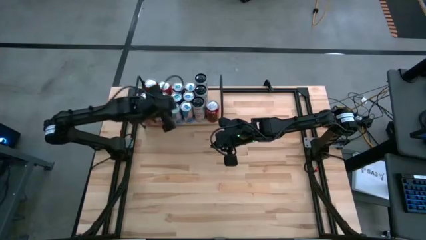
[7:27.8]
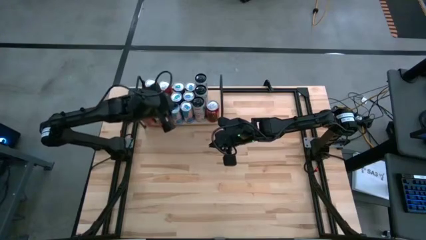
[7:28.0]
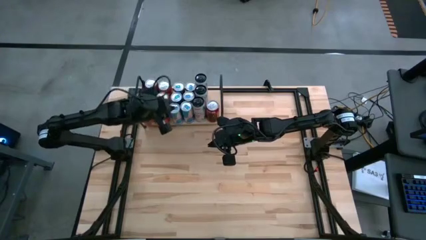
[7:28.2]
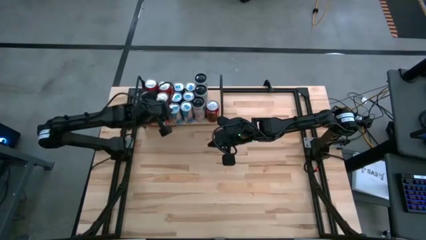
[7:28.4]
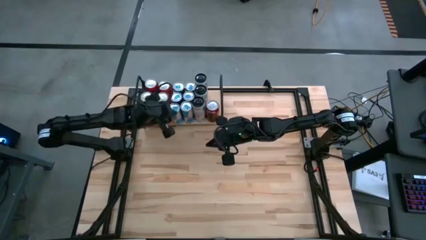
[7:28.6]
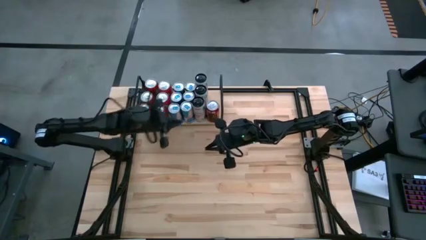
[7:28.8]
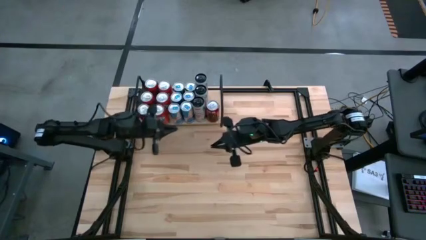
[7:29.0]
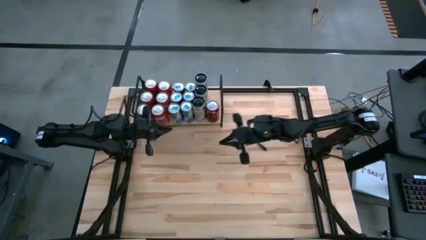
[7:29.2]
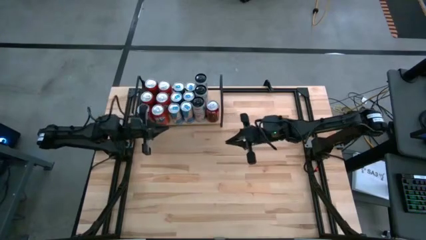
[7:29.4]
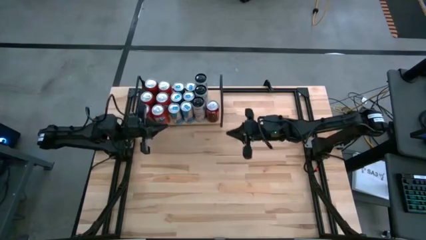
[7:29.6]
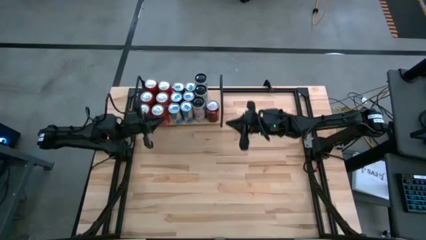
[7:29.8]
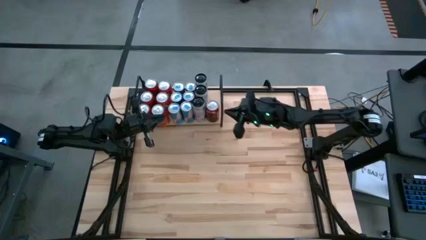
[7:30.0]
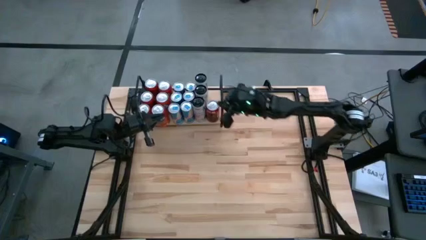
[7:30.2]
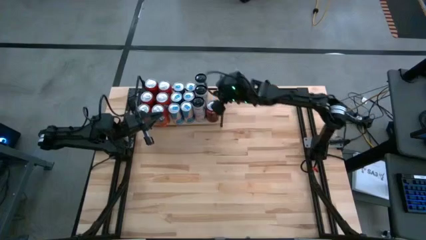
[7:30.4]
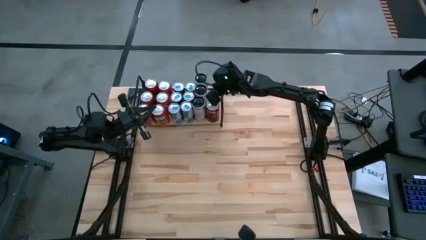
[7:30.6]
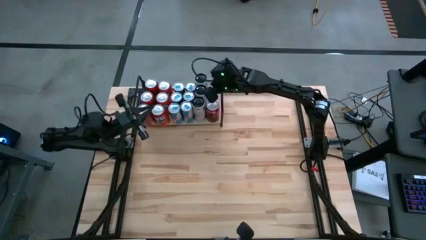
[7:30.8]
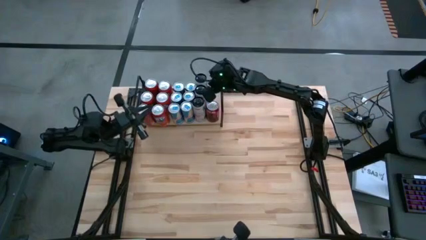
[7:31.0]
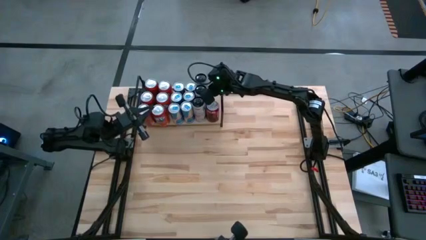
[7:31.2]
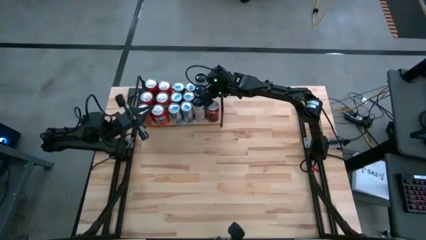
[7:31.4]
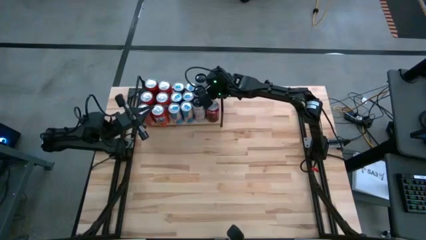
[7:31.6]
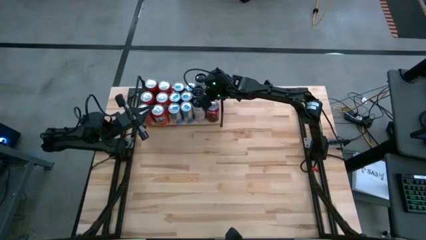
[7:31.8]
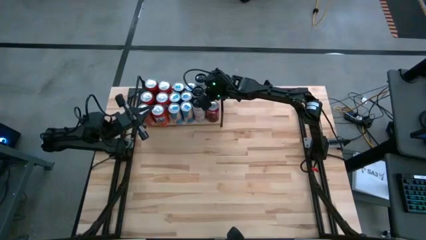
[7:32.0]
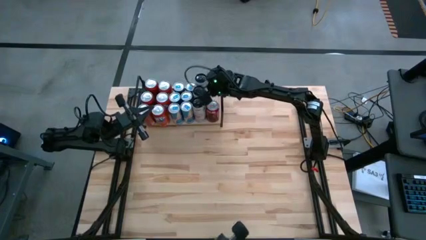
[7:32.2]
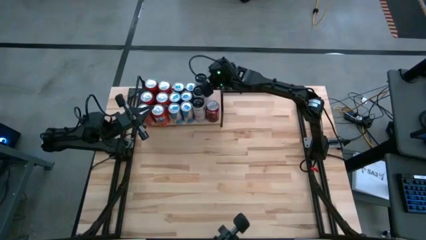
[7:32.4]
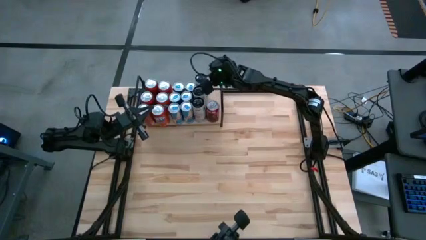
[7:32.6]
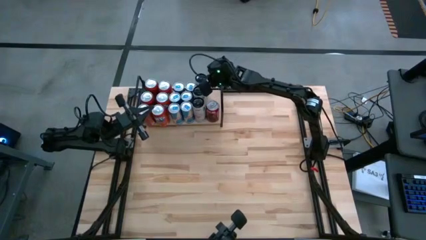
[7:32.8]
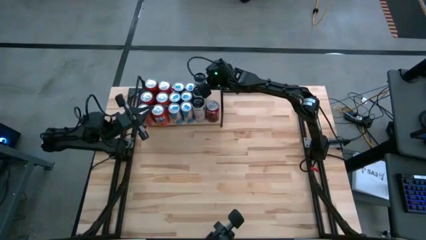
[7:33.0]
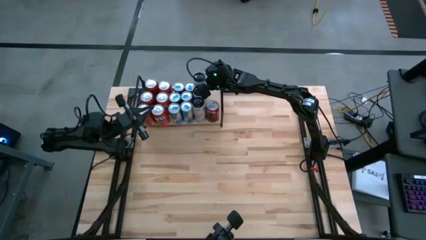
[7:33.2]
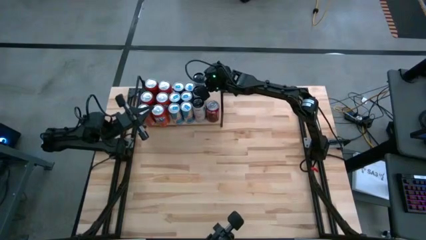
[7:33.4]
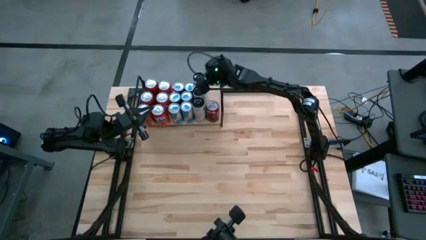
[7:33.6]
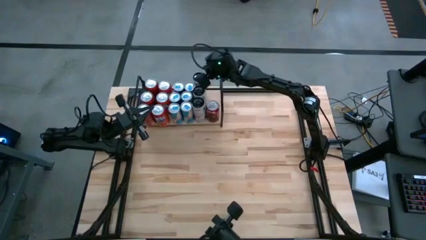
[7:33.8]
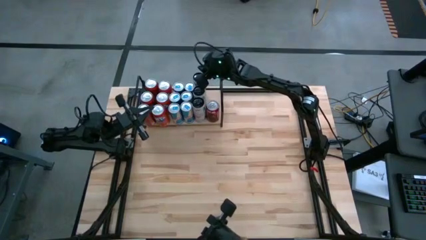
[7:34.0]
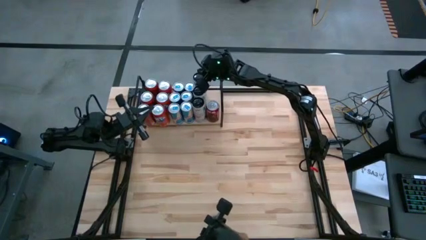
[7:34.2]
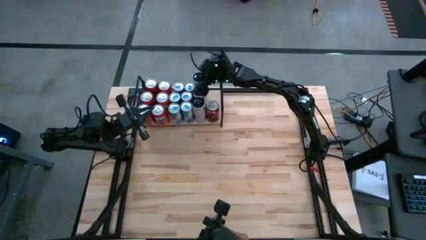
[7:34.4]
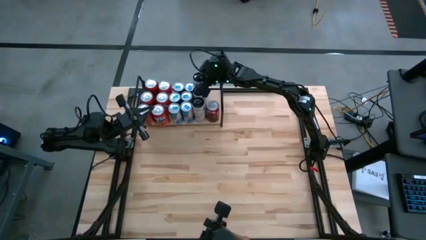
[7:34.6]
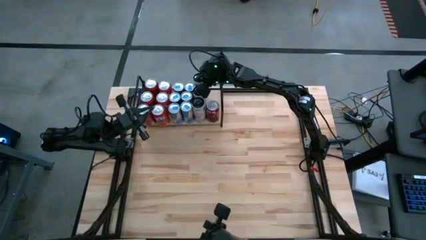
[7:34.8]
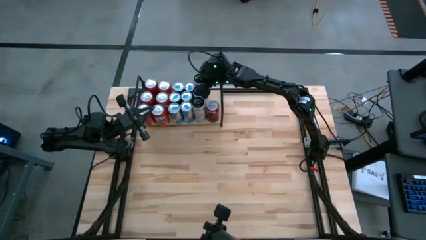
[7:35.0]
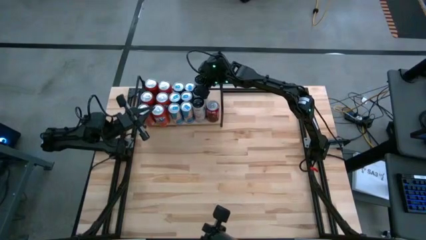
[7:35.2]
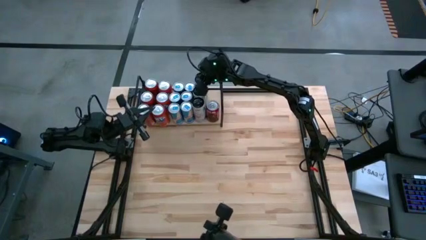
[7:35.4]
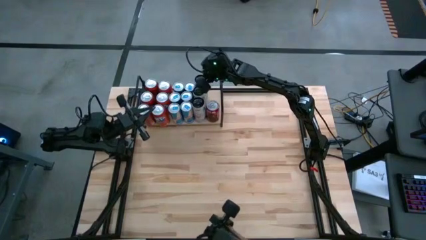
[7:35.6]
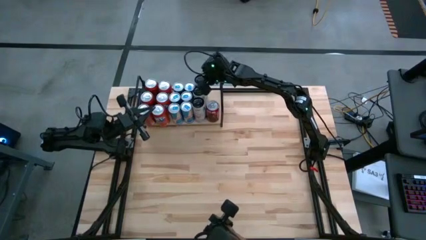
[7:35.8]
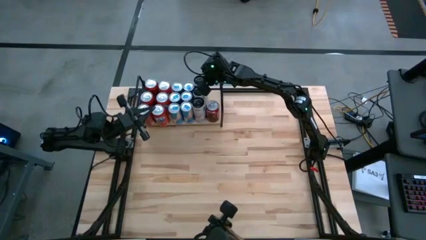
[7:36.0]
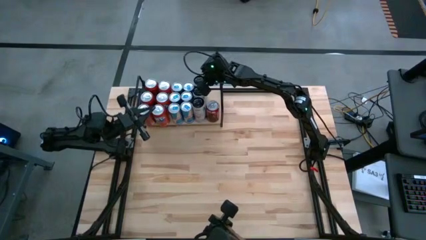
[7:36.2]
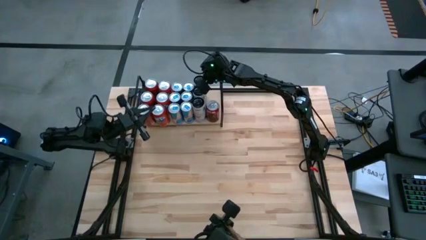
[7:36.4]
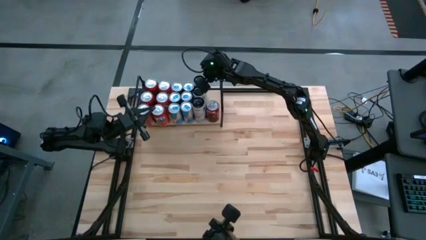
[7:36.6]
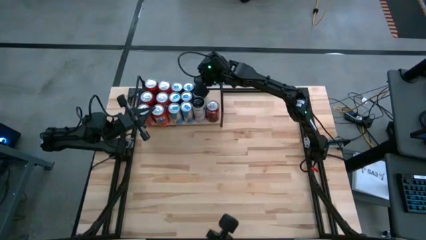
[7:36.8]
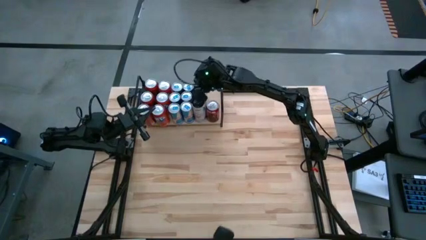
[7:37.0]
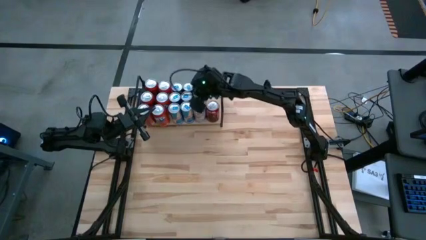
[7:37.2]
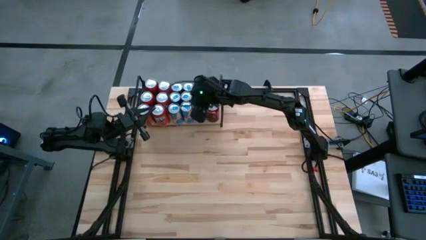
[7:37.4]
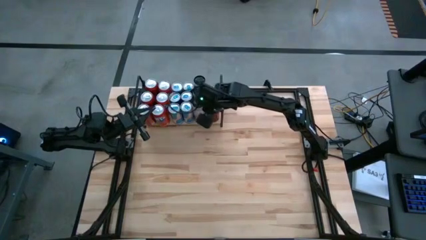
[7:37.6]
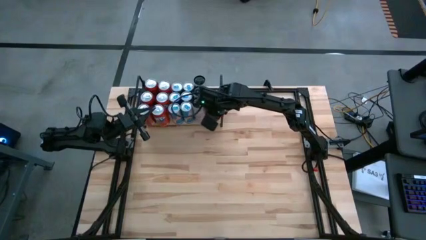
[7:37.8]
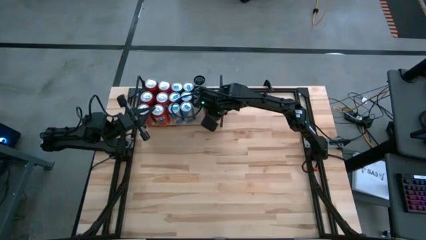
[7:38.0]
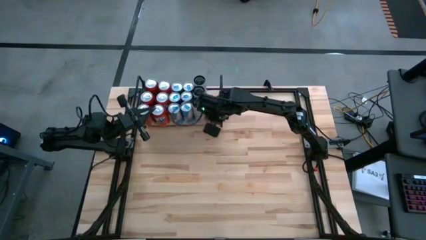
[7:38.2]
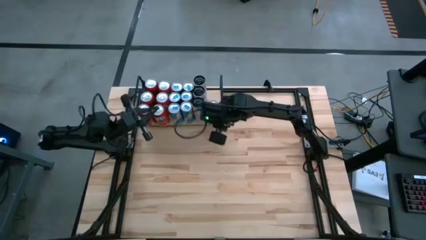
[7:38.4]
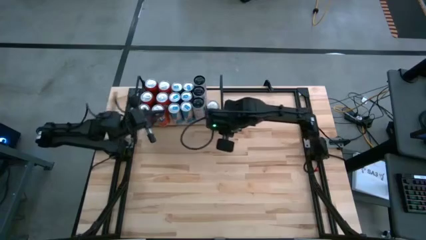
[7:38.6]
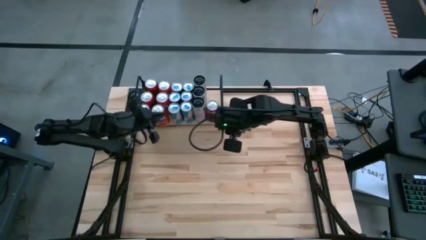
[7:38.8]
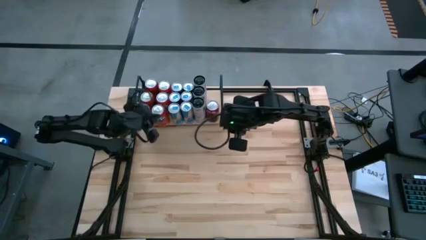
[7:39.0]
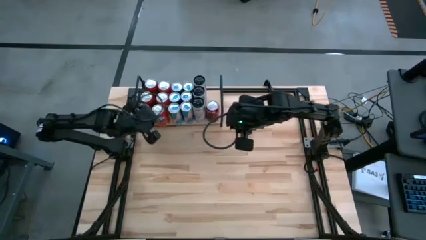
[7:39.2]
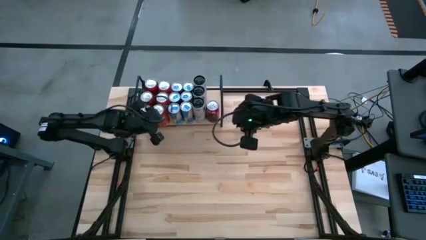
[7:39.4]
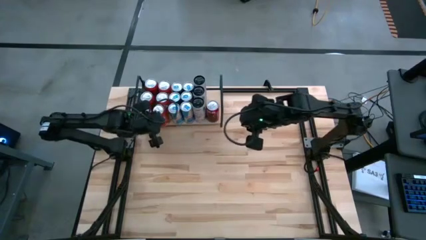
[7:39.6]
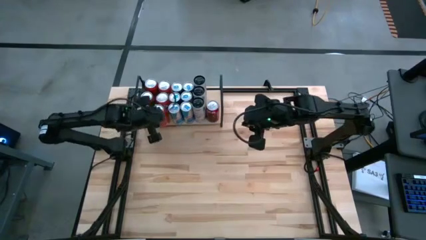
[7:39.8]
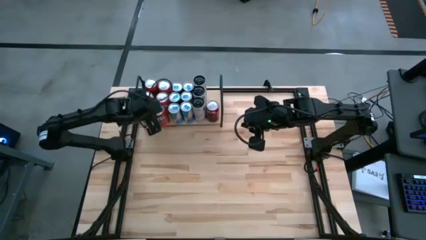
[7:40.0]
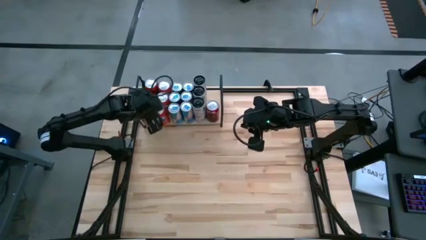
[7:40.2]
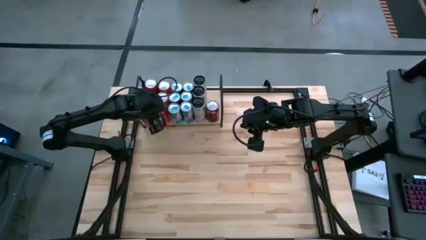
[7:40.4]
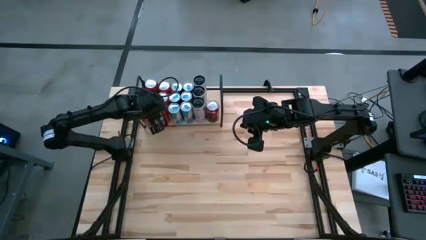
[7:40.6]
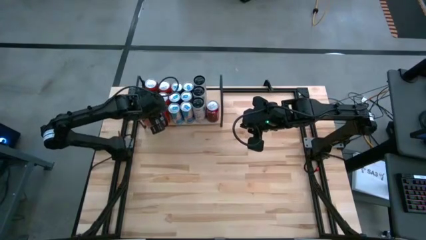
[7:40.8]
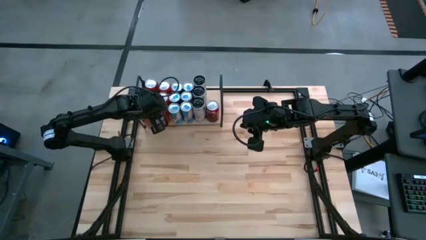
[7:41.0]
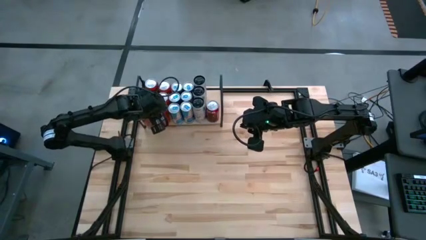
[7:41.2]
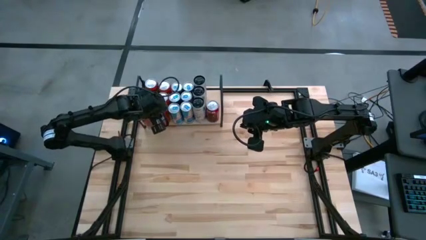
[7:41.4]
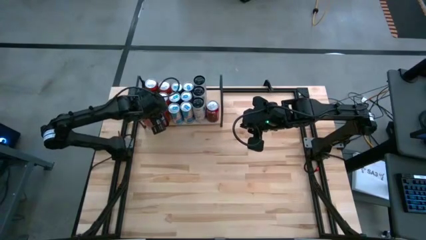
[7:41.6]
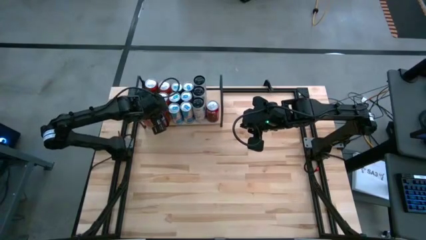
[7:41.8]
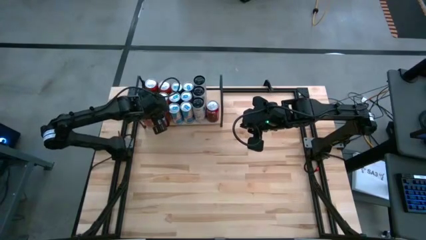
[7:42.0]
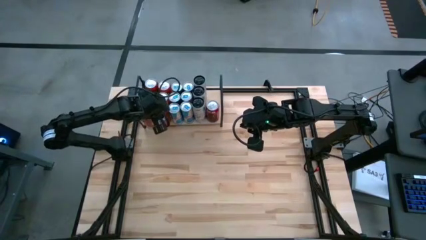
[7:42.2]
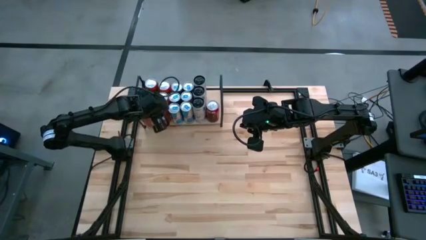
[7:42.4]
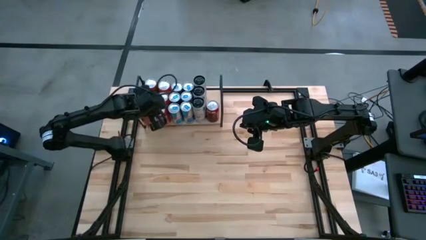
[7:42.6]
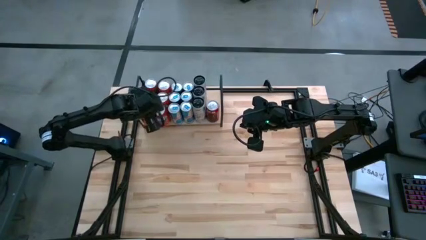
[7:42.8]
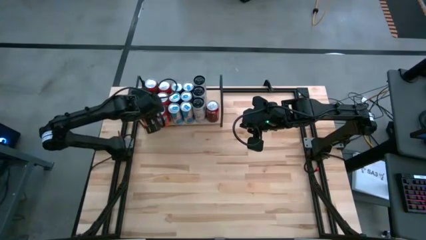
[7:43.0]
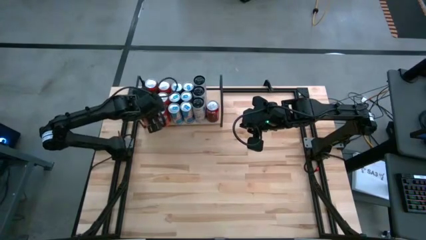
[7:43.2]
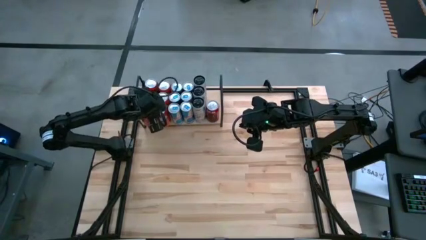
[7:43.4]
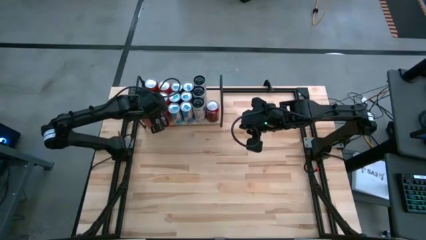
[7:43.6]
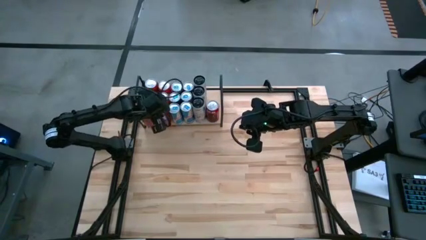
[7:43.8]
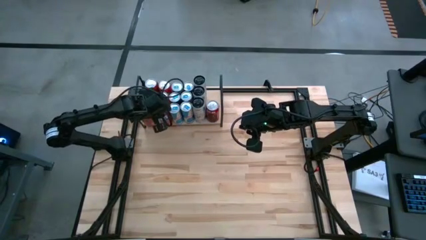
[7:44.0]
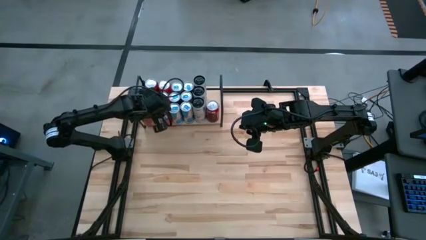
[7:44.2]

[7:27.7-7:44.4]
Task: Place canned beverage on shelf
Adjust the soda cans on the shelf
